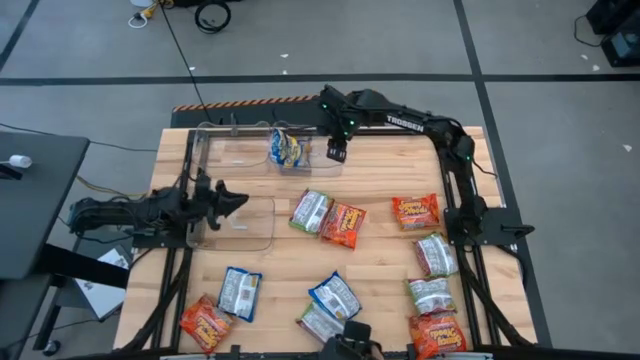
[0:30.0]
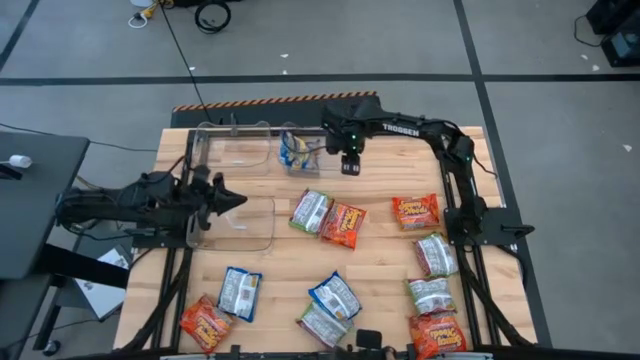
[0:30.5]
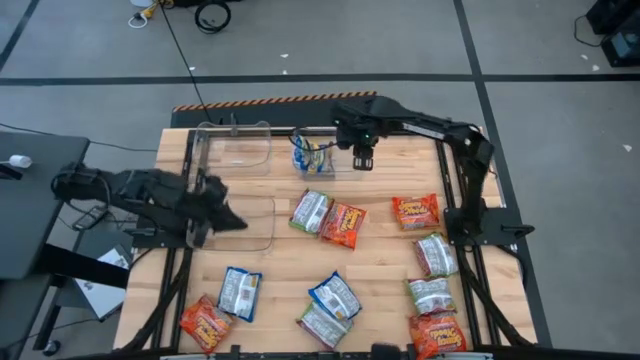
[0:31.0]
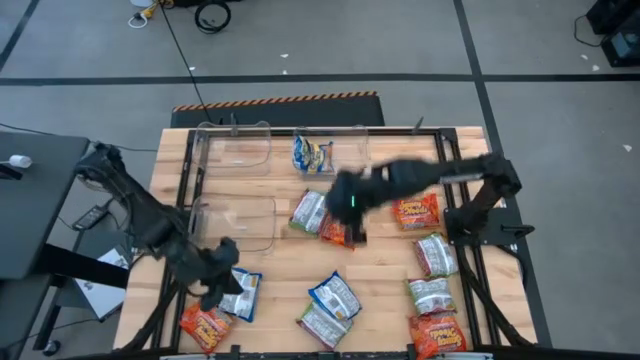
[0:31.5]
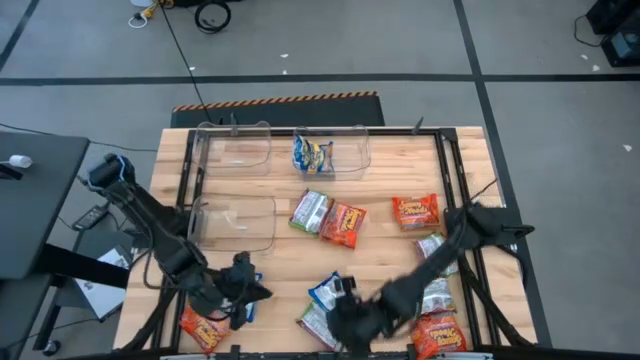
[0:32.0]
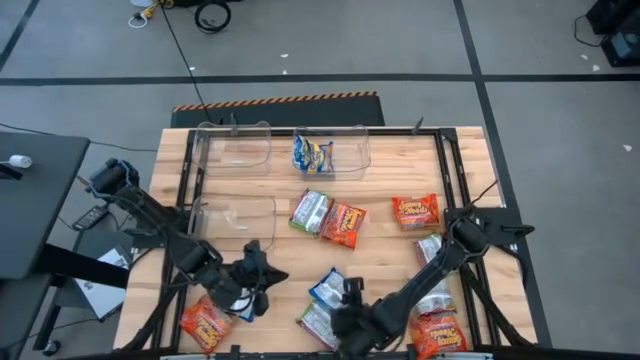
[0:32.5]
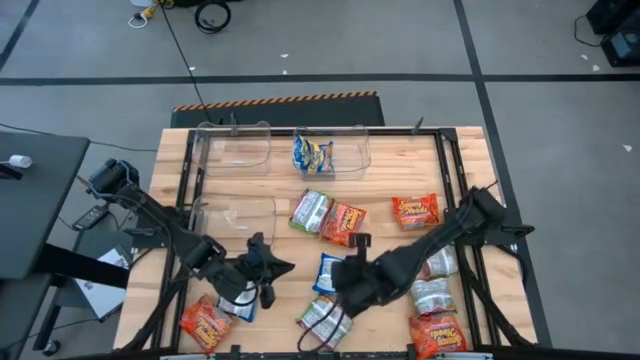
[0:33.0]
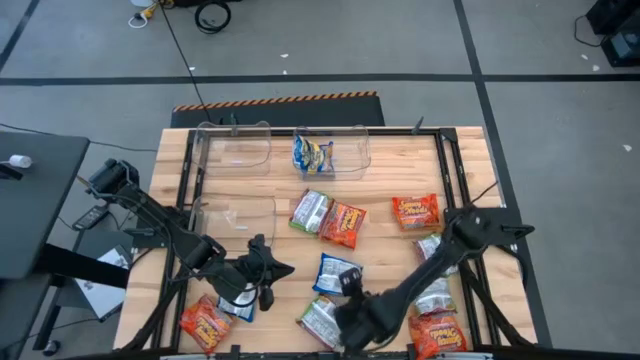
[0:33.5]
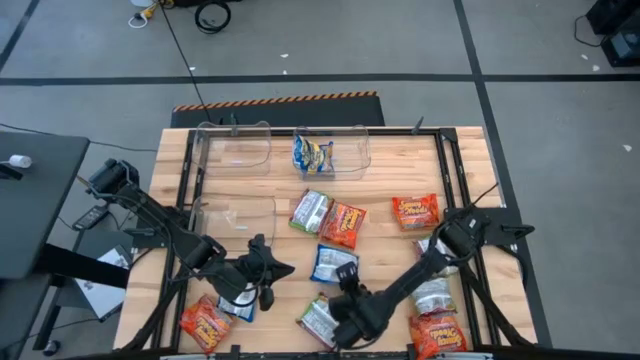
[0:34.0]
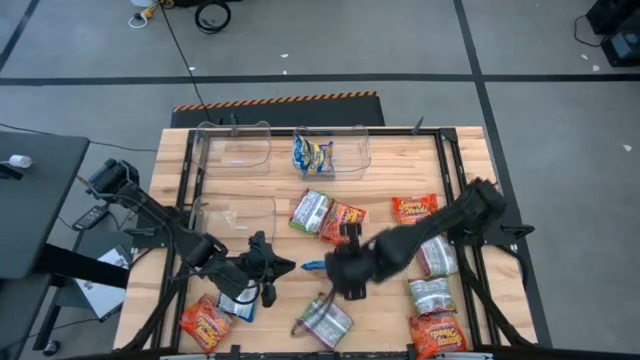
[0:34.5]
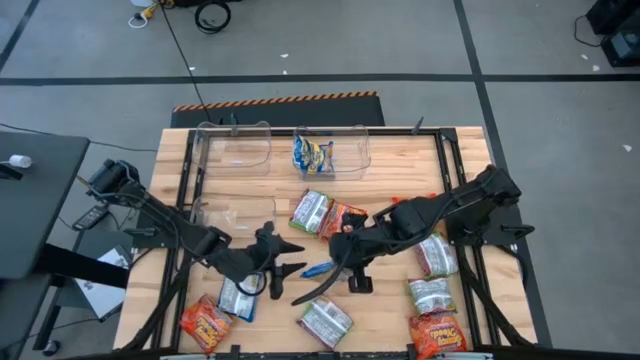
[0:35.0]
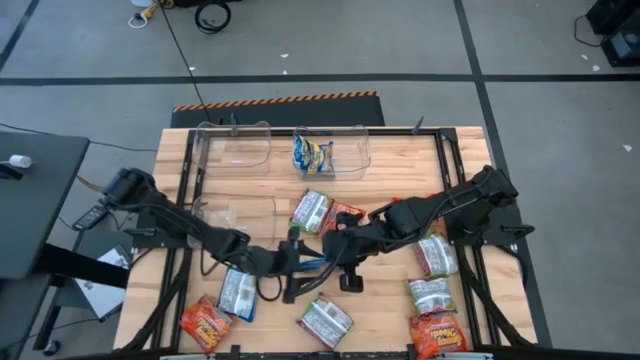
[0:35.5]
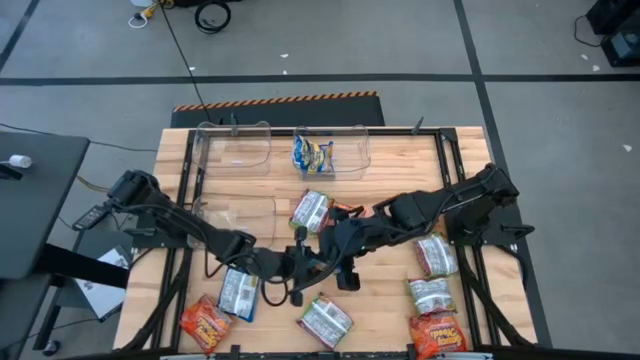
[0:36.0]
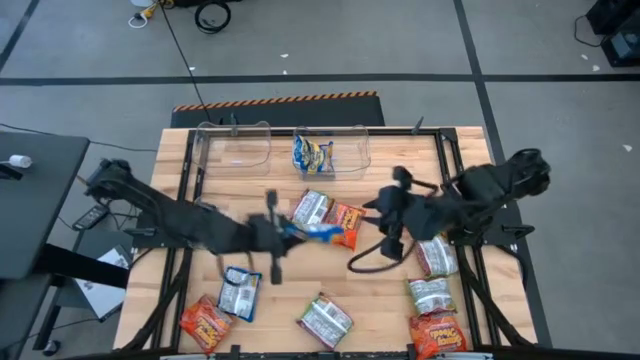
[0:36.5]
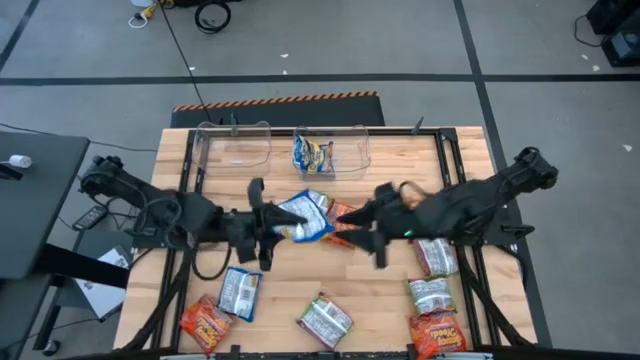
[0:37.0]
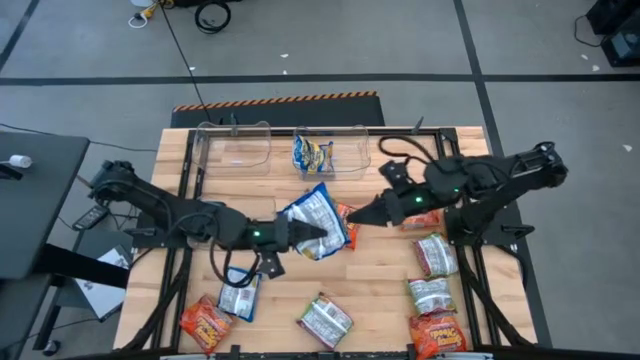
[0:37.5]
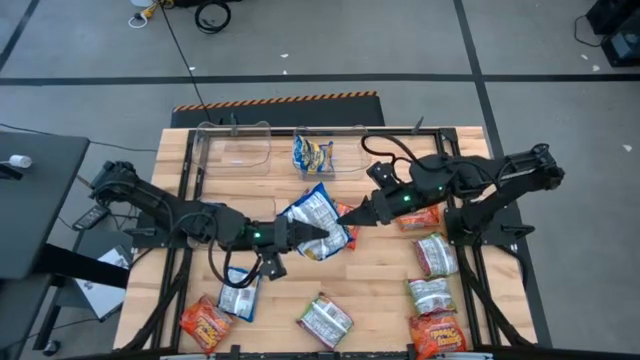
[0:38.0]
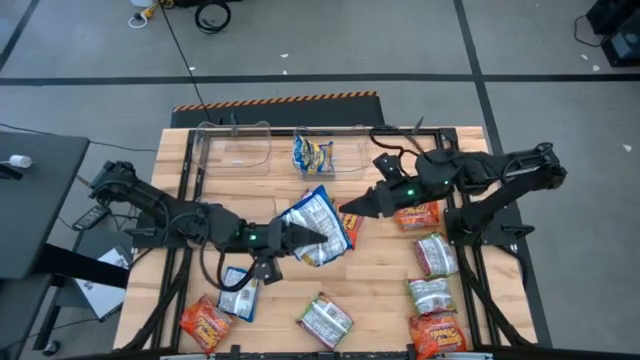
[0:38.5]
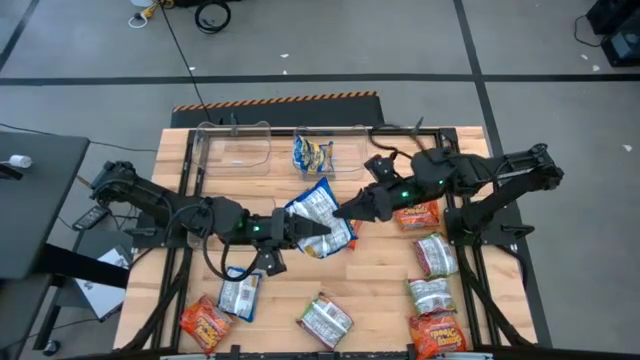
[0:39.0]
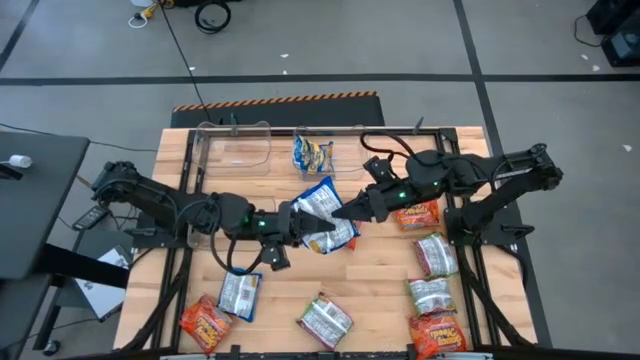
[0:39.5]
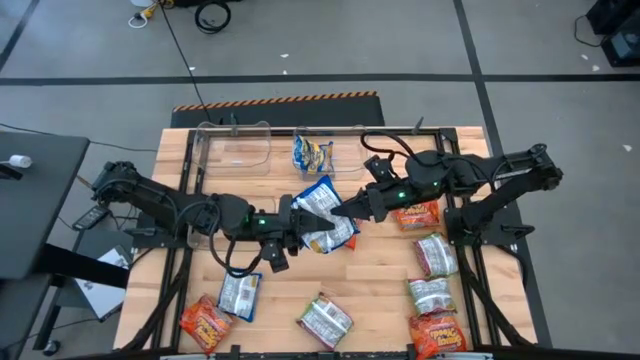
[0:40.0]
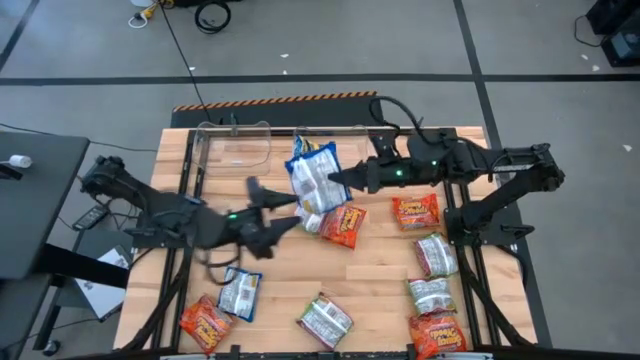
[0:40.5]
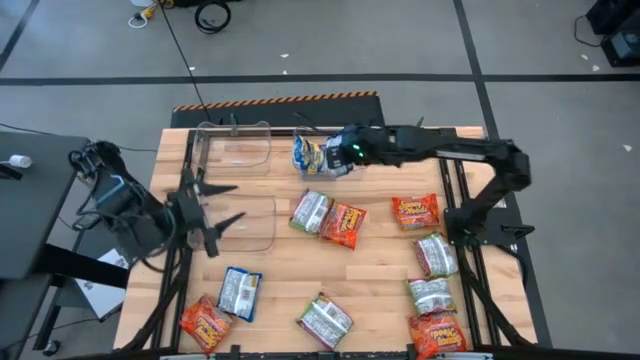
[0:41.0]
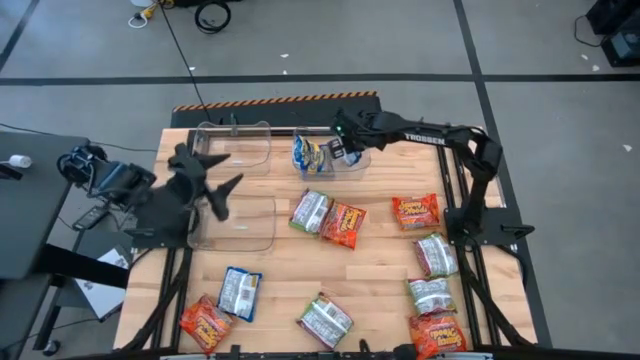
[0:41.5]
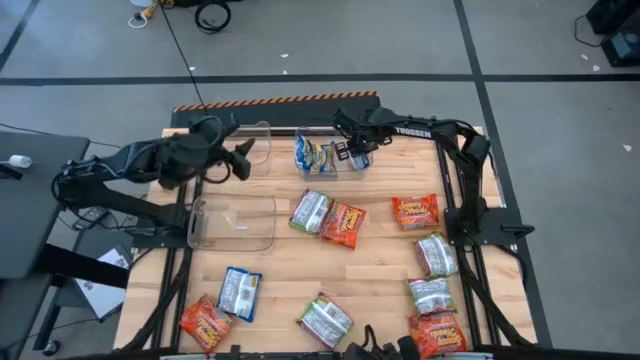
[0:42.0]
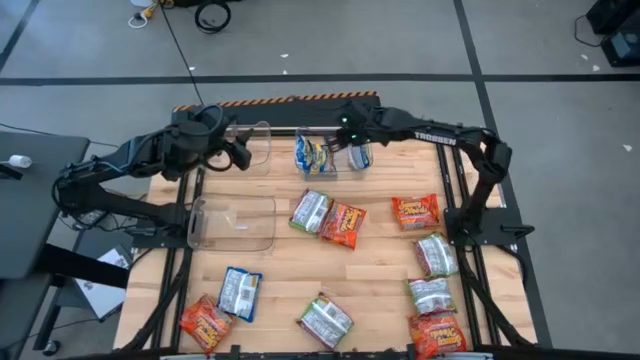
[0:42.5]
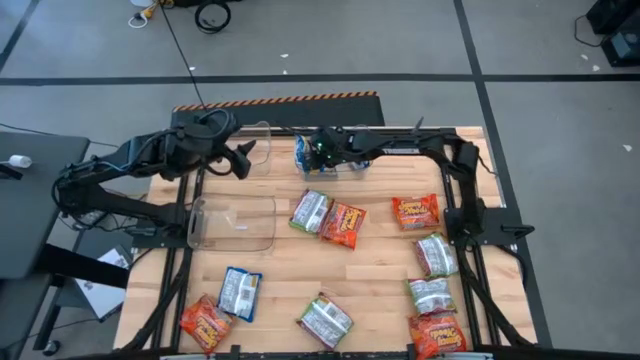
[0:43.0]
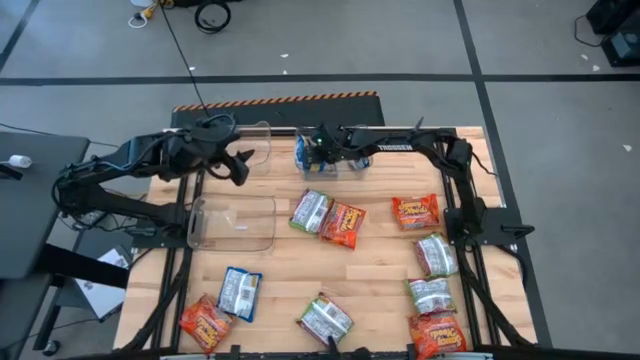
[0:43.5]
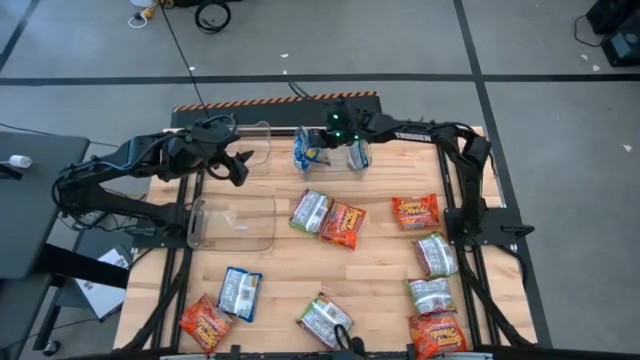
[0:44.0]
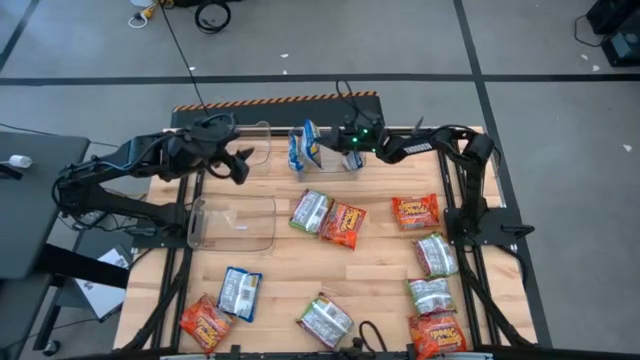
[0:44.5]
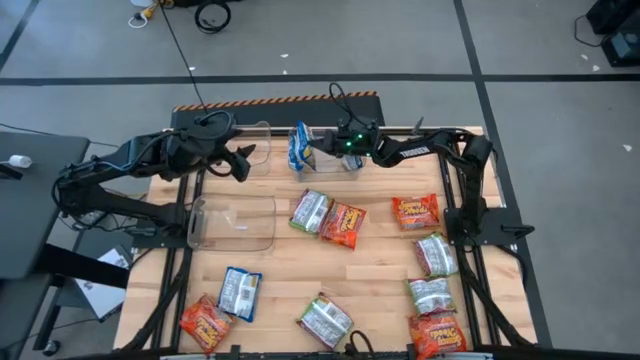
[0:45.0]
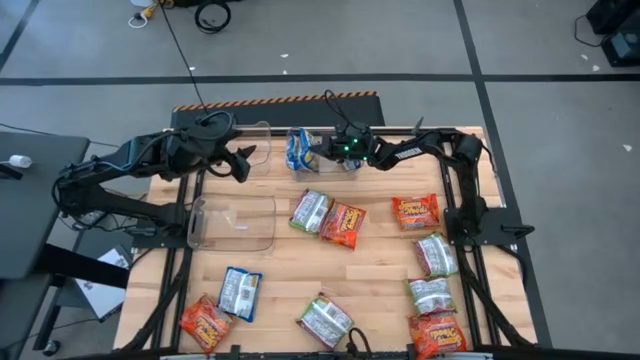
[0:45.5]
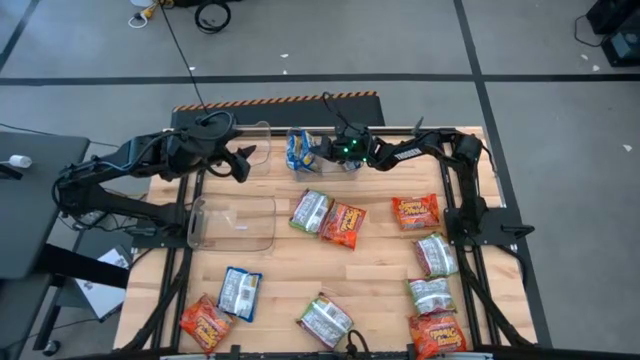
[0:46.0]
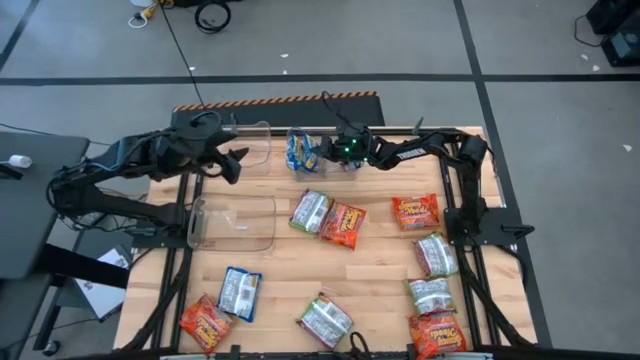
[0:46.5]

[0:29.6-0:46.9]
Task: Sort Maruchan noodles
Put the blue noodle pack into the right transparent bin

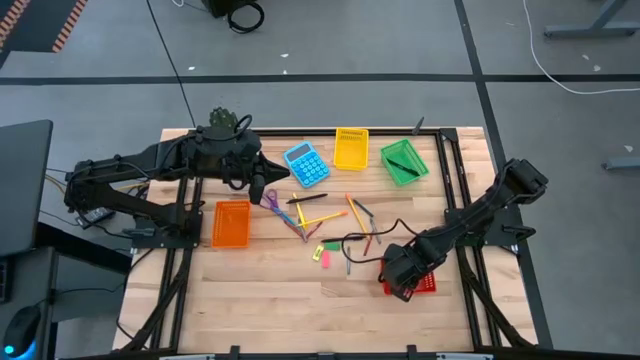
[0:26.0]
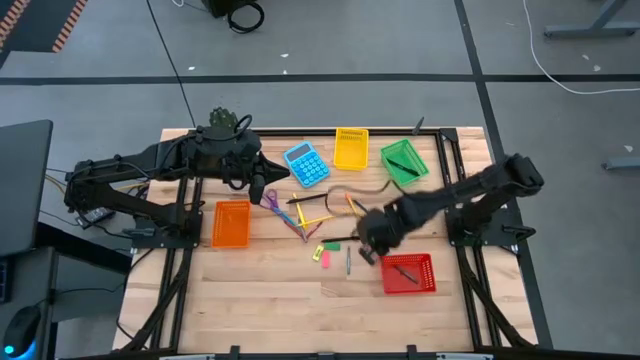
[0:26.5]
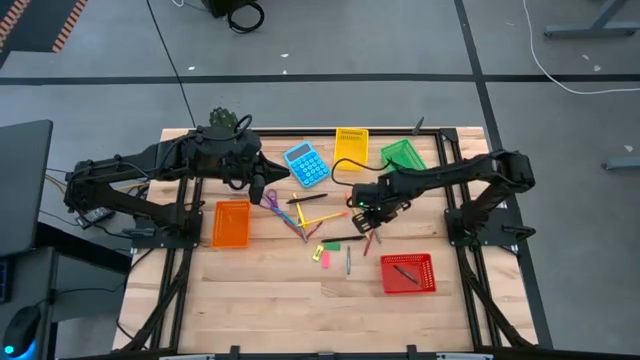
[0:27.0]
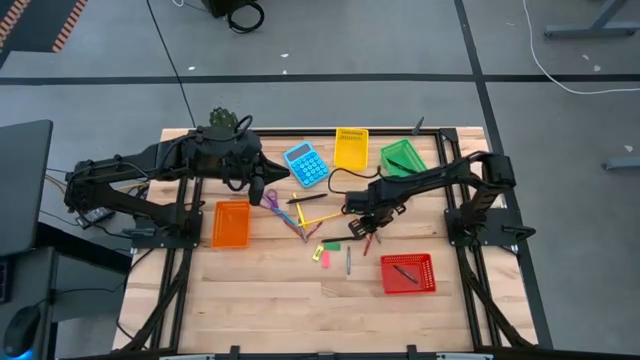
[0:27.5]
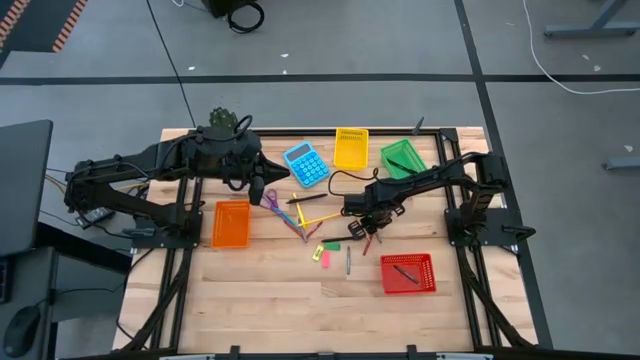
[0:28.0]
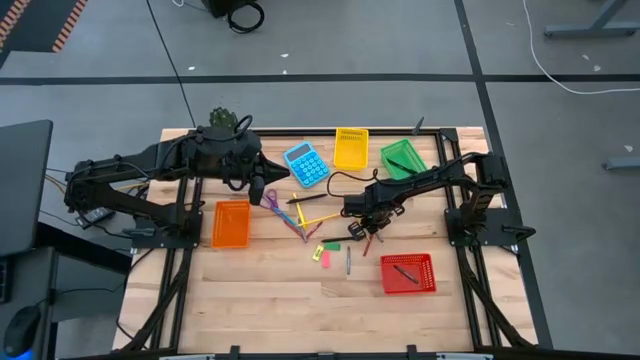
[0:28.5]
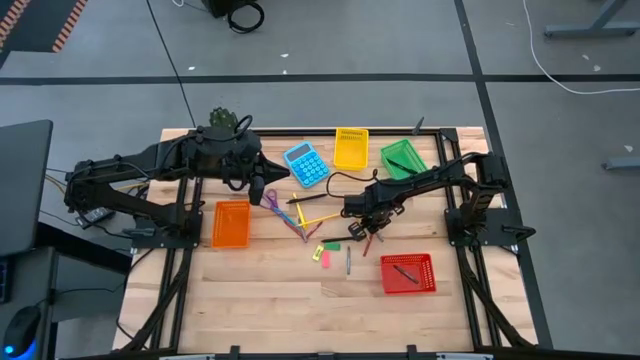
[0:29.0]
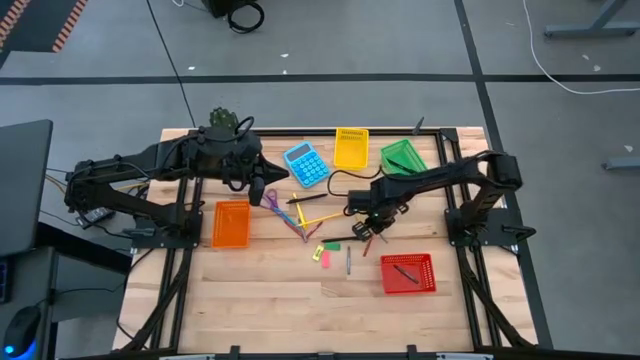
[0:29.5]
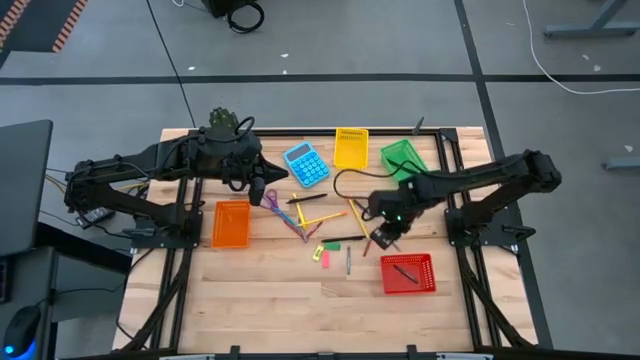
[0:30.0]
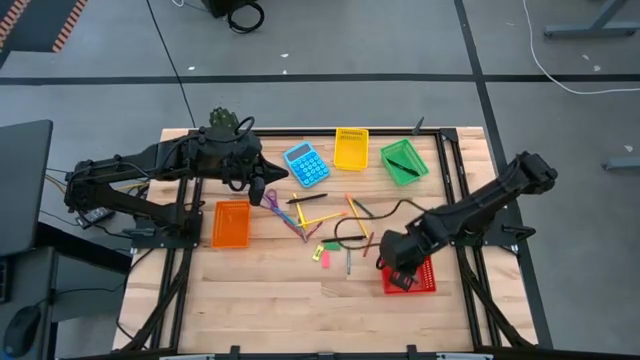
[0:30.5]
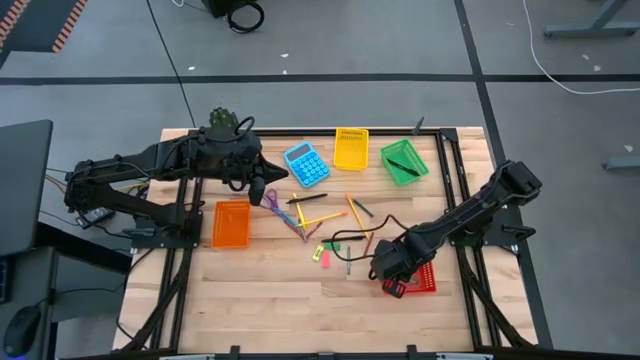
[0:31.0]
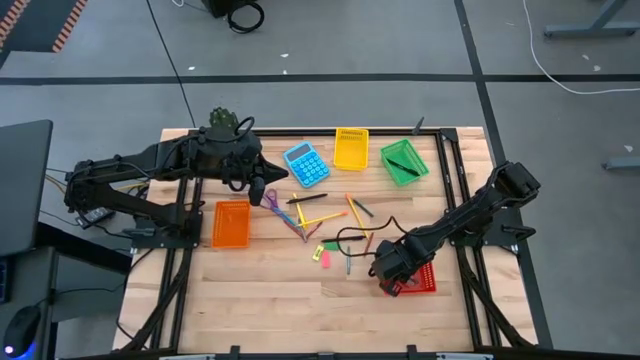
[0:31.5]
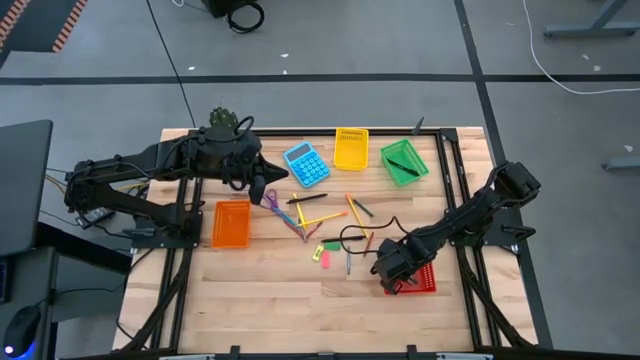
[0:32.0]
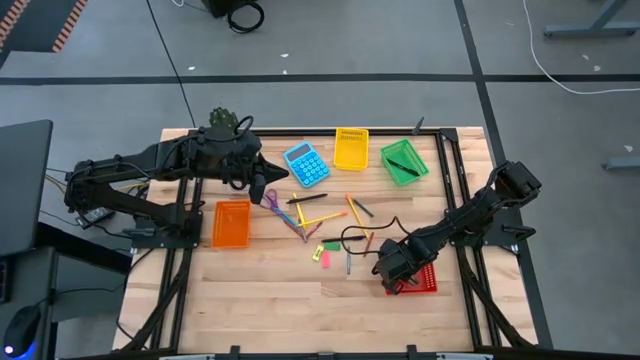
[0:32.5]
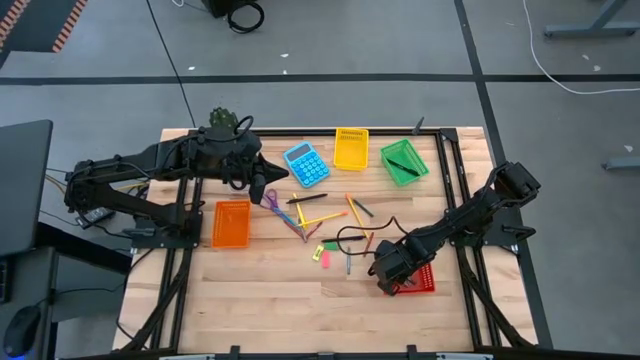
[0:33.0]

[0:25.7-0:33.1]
Task: Sort crayons/erasers/pens/pencils in bins
Put the top right gray crayon into the red bin
